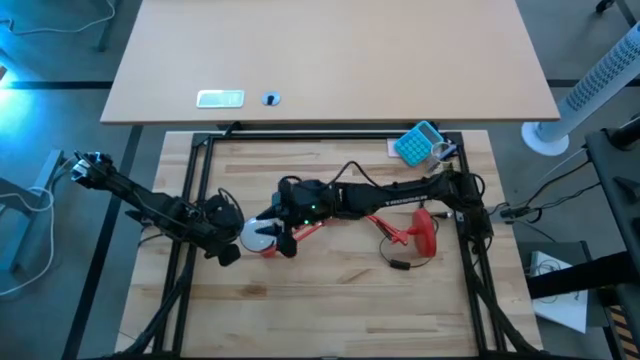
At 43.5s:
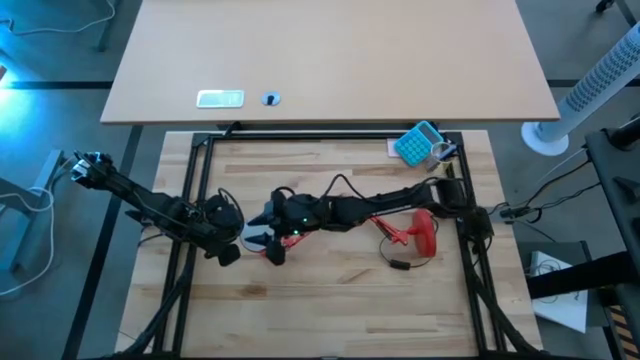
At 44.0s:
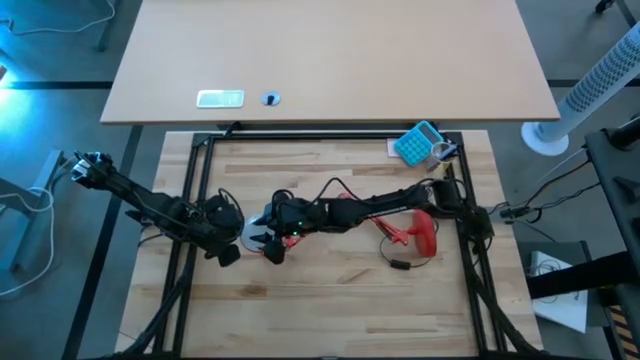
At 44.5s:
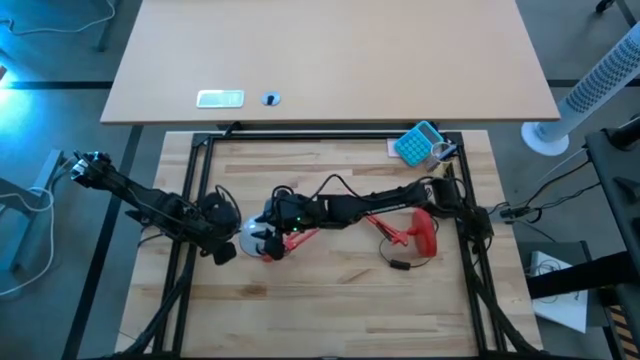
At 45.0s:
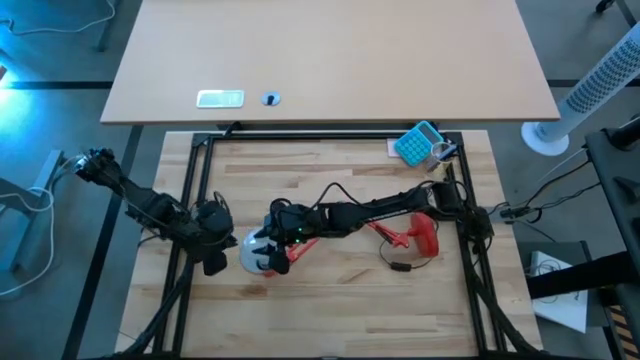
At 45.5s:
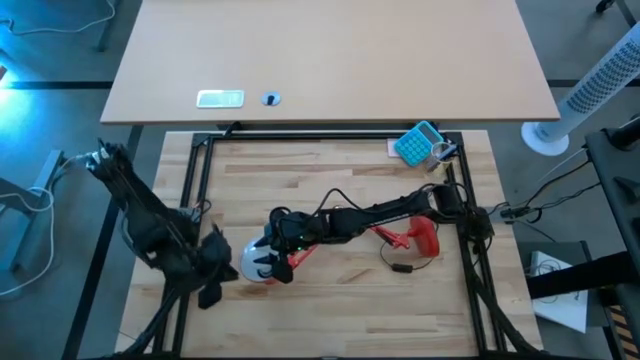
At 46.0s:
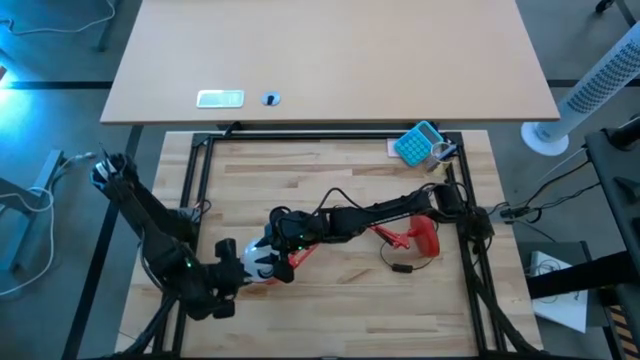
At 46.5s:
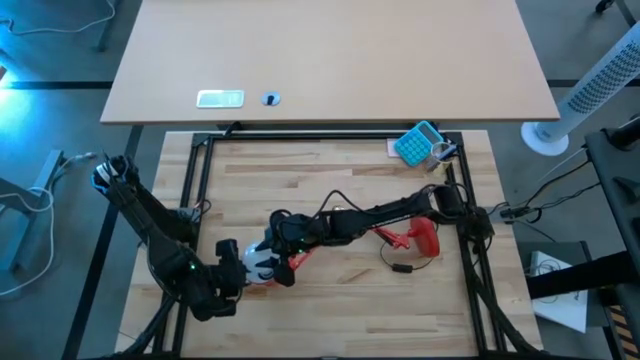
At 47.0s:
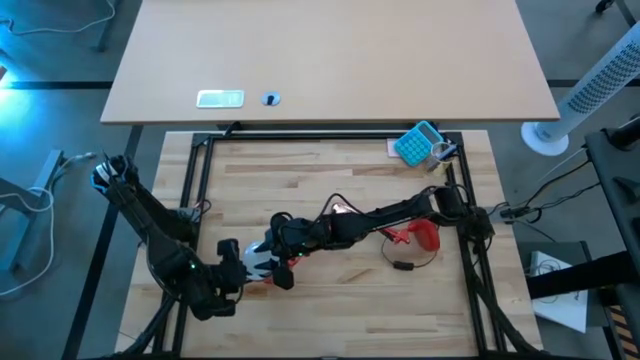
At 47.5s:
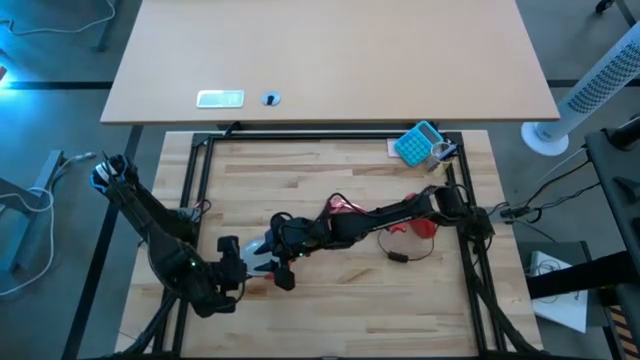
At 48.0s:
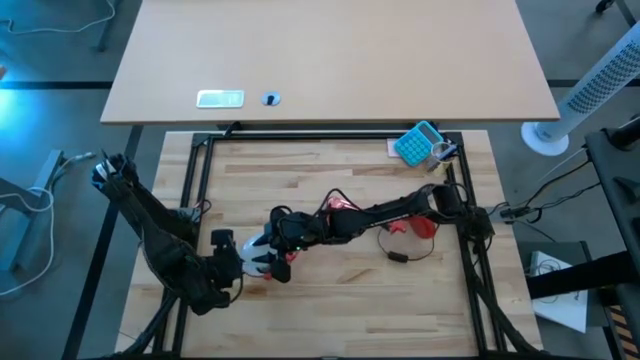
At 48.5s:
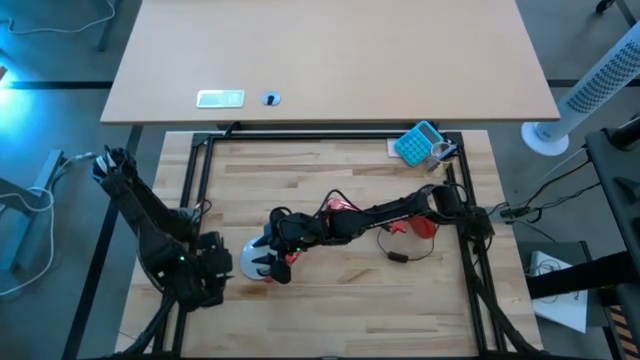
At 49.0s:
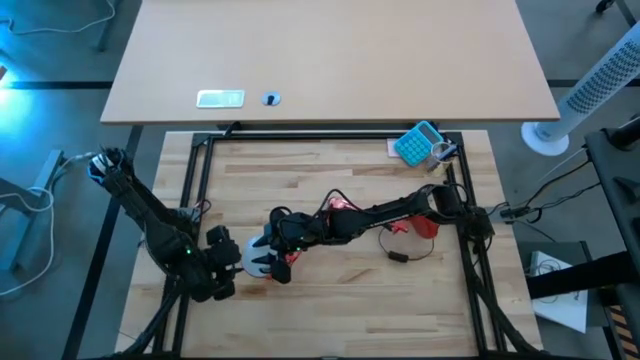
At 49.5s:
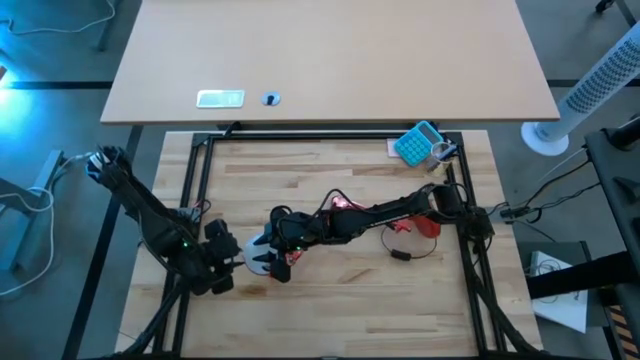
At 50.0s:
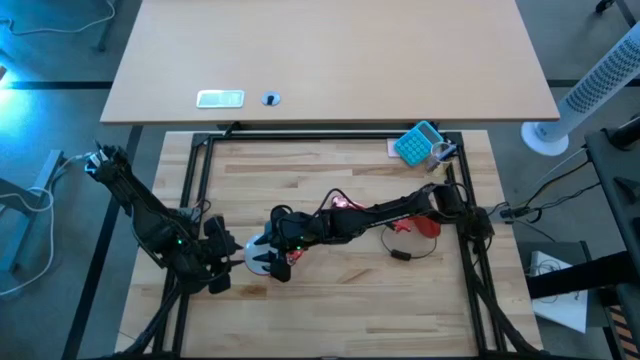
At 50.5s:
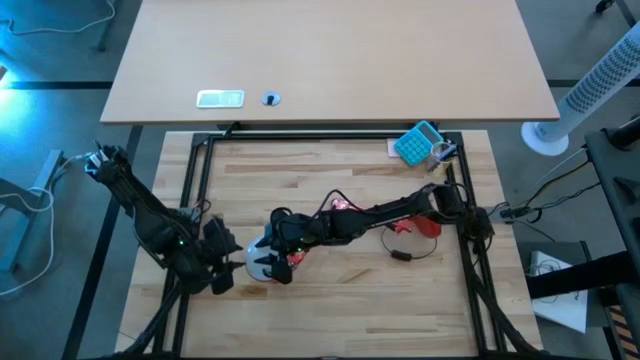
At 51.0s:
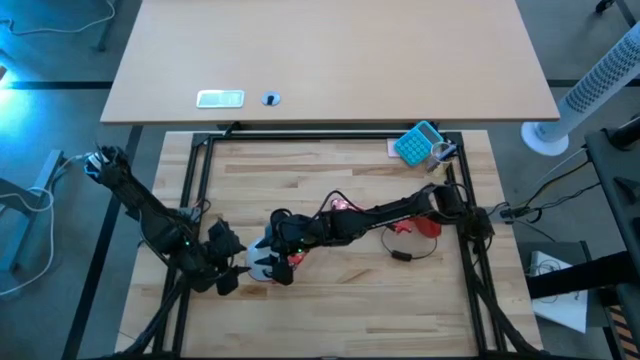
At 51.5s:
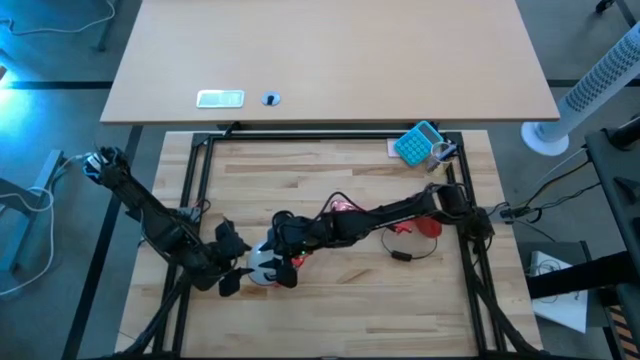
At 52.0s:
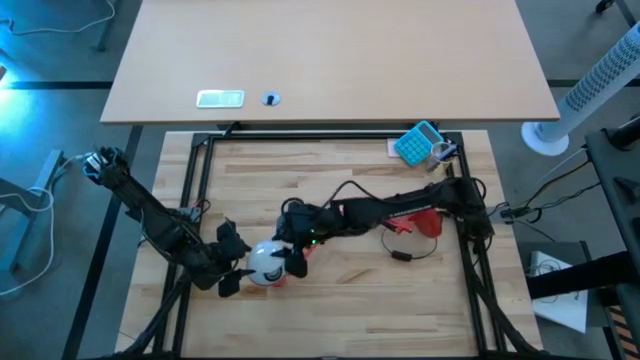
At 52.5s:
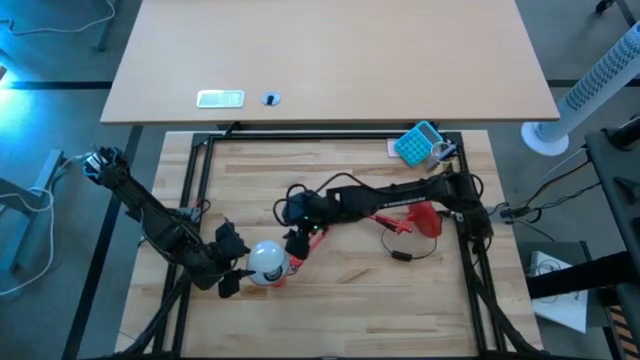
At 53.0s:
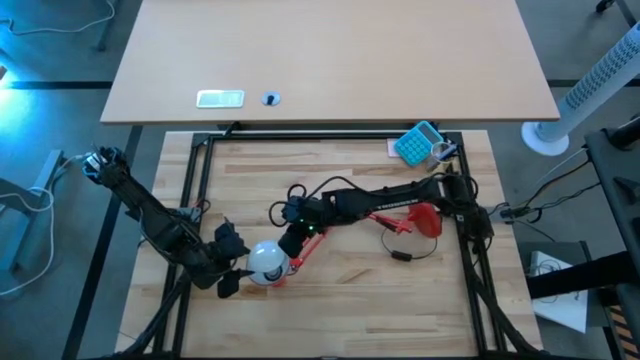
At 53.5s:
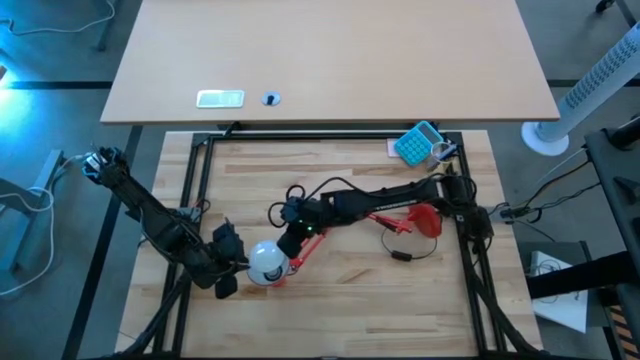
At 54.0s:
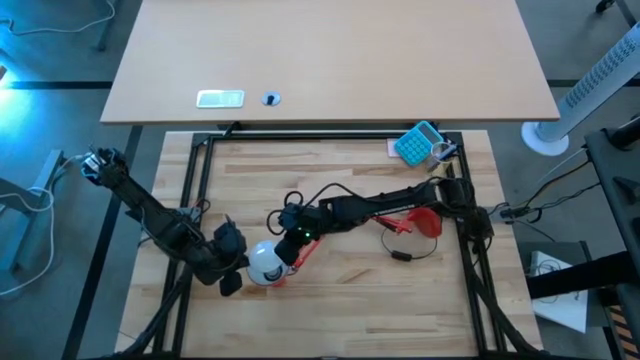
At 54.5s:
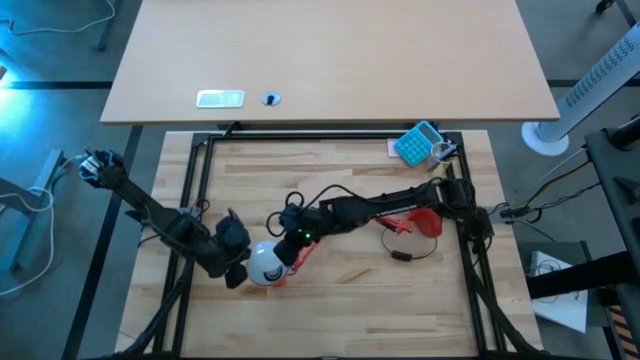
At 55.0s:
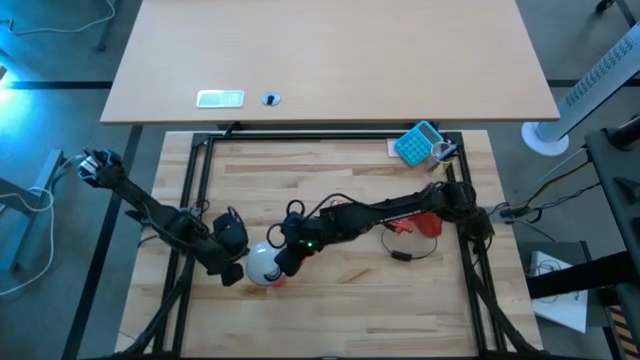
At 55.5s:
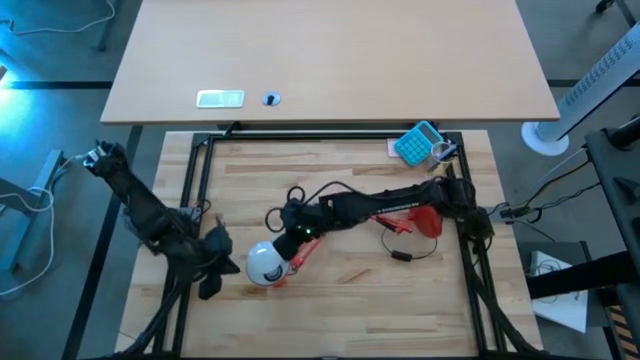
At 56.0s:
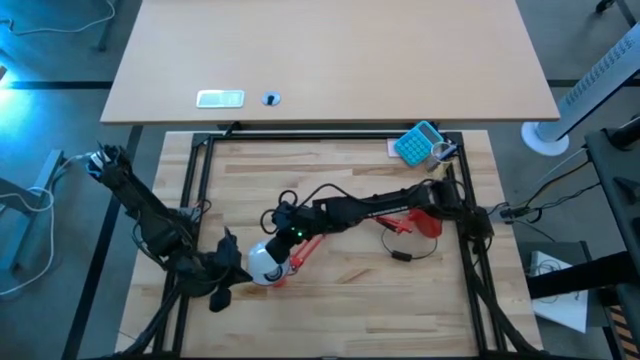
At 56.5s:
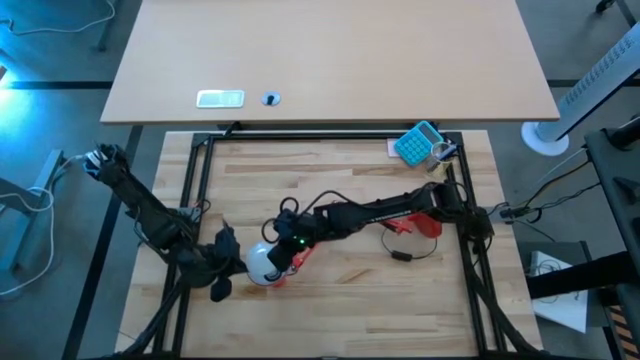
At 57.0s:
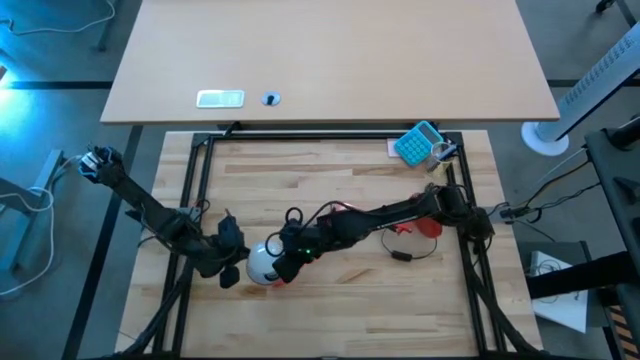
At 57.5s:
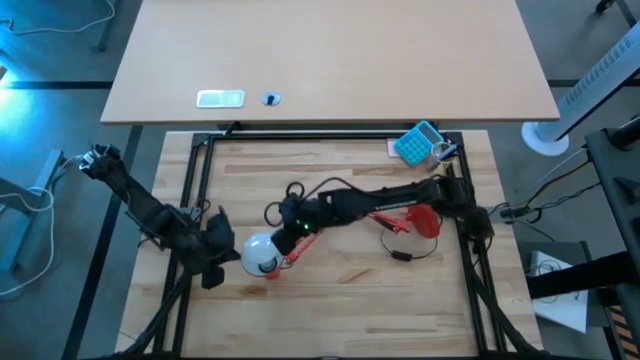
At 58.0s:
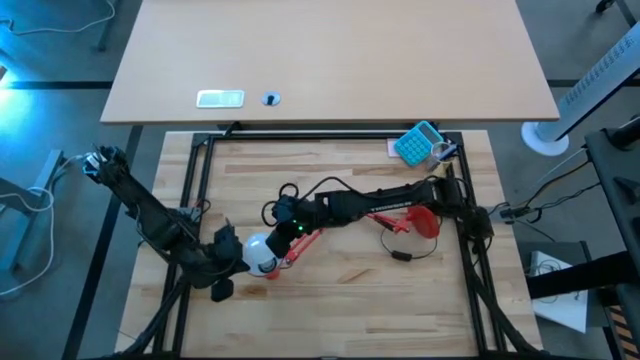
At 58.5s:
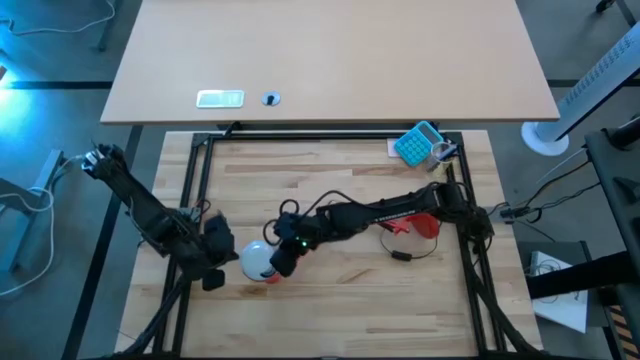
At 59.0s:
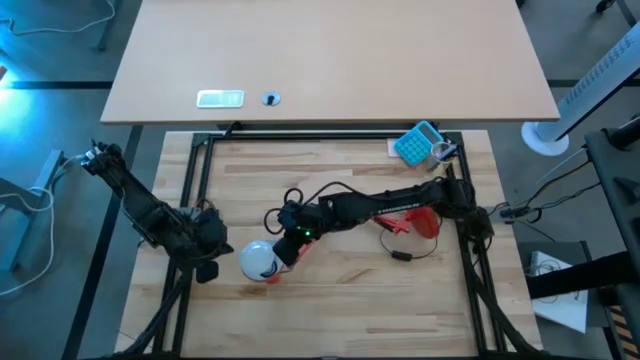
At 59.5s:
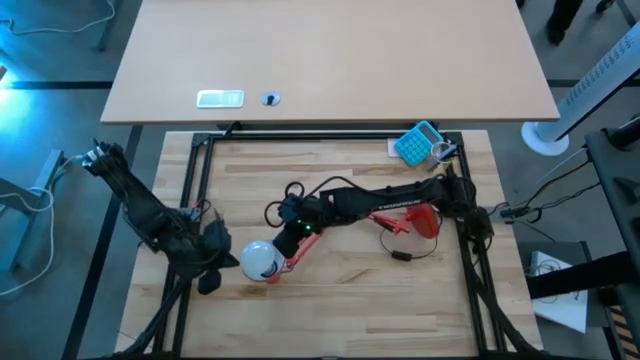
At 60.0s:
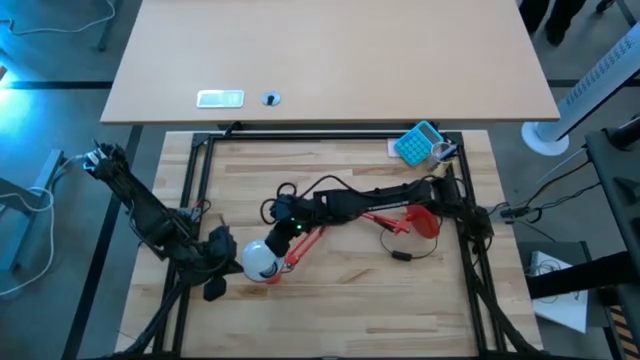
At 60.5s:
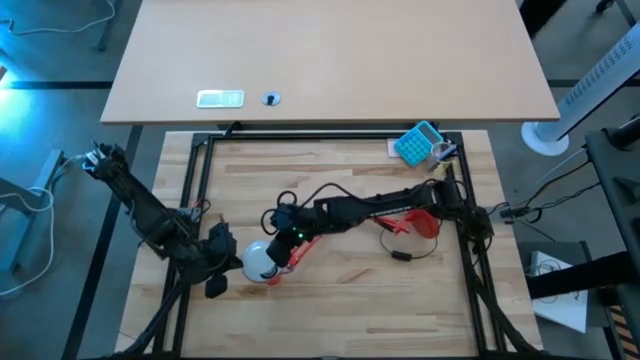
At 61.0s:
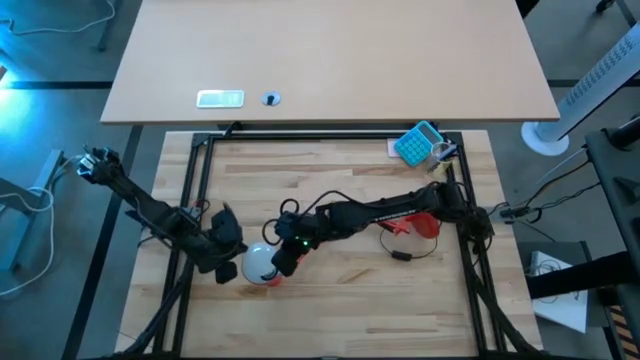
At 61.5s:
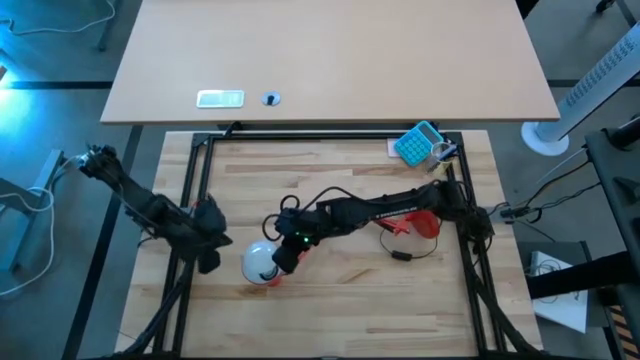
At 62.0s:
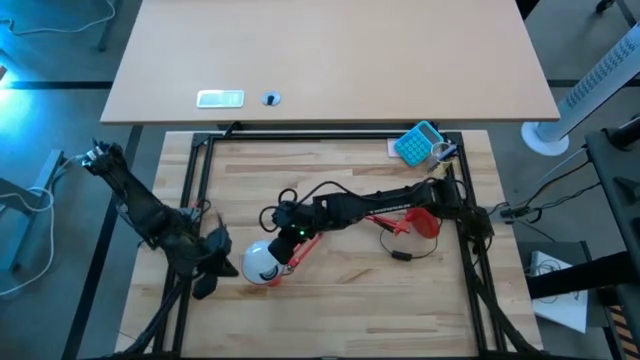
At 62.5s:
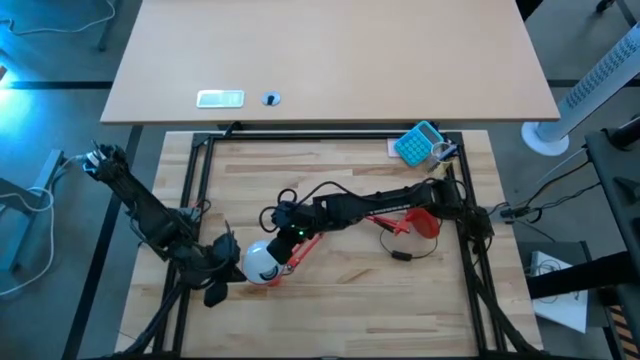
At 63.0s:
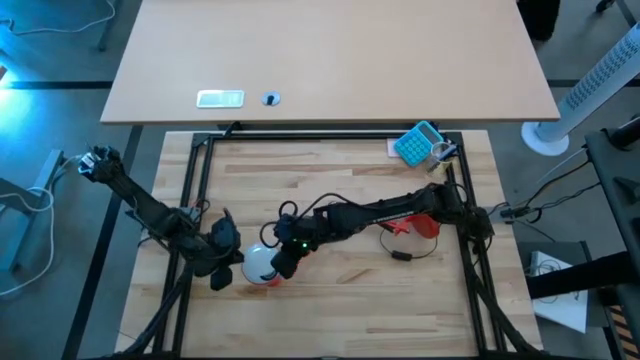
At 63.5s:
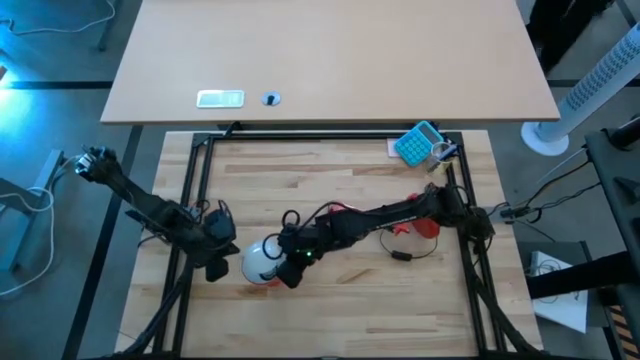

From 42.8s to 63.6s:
Task: Screw lightbulb
Insert the lightbulb into the orange desk lamp
